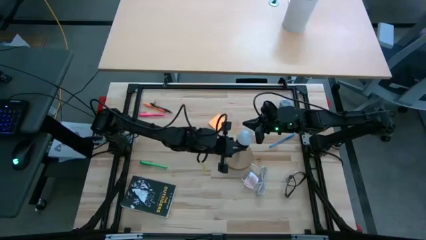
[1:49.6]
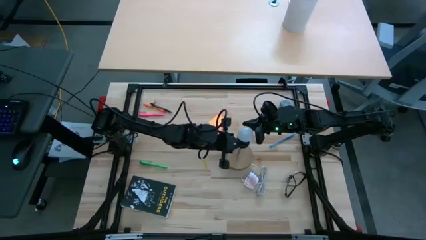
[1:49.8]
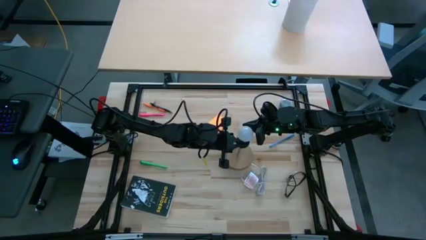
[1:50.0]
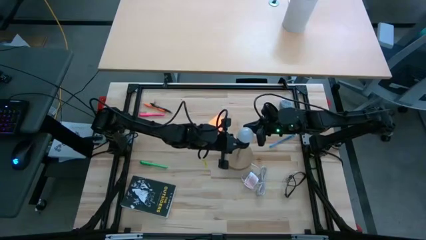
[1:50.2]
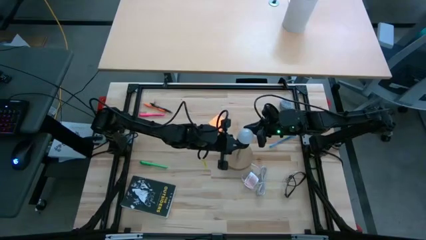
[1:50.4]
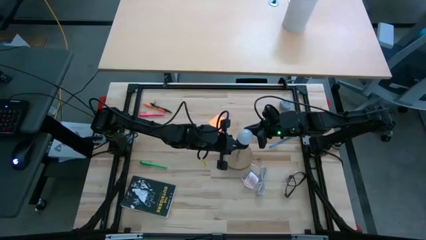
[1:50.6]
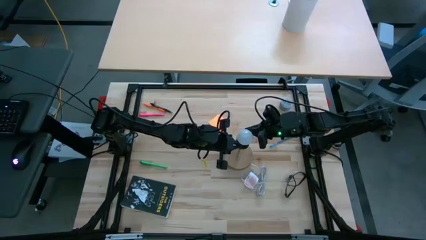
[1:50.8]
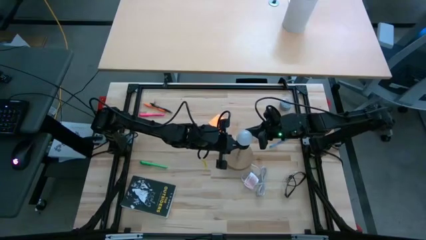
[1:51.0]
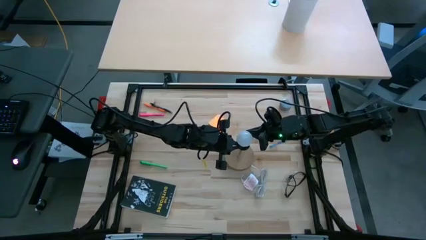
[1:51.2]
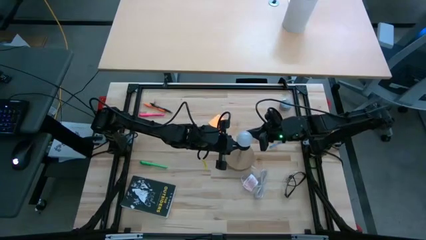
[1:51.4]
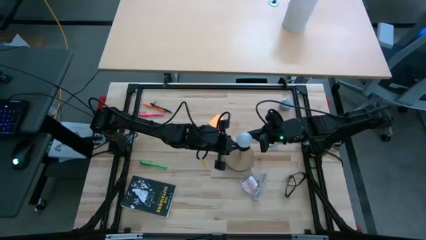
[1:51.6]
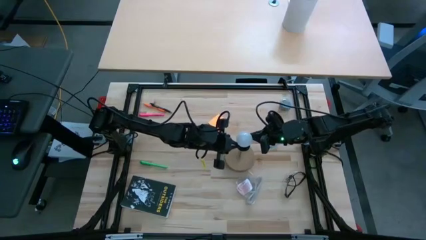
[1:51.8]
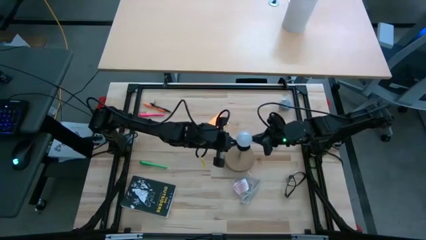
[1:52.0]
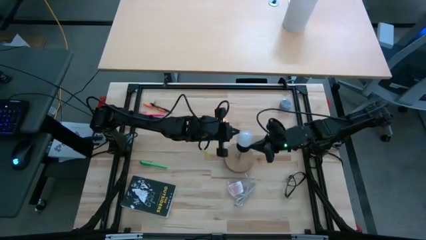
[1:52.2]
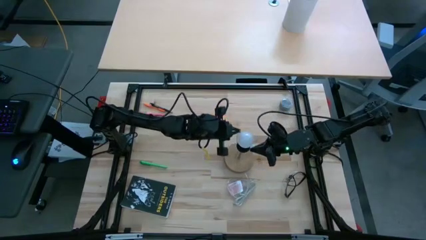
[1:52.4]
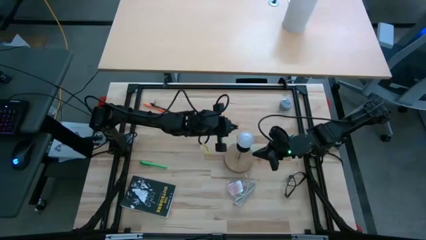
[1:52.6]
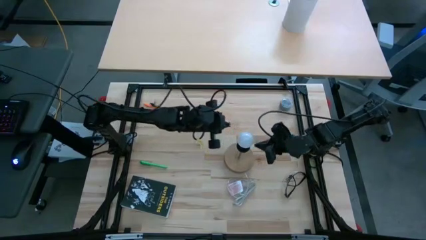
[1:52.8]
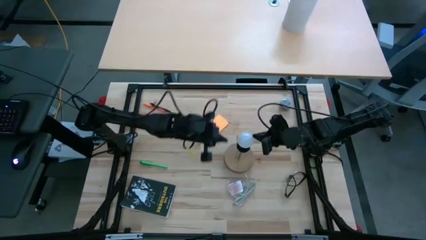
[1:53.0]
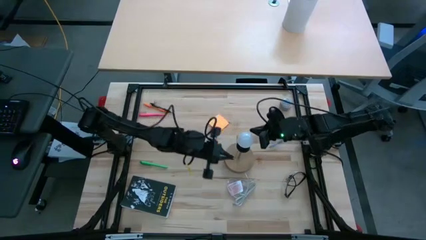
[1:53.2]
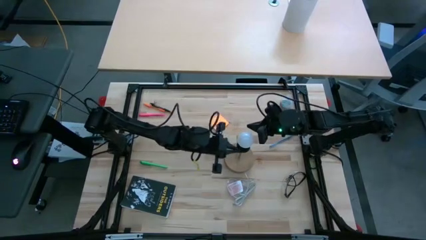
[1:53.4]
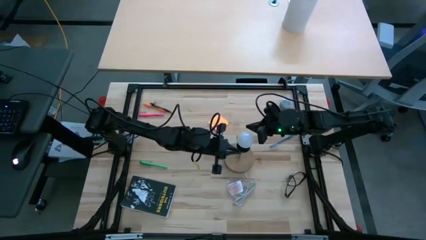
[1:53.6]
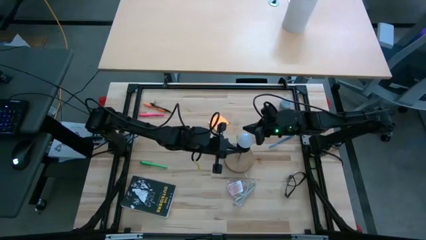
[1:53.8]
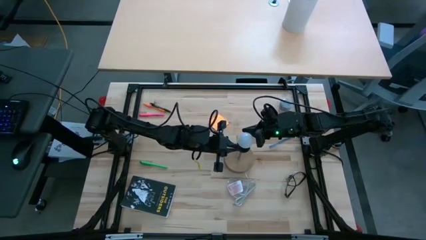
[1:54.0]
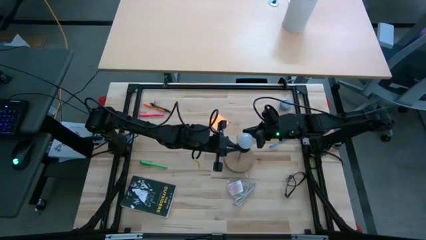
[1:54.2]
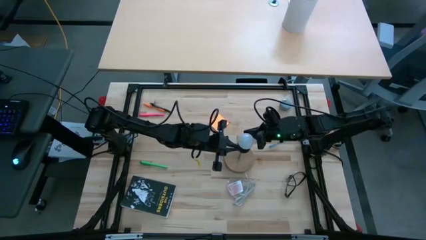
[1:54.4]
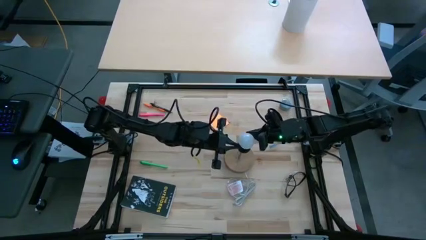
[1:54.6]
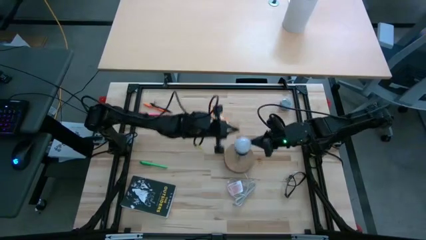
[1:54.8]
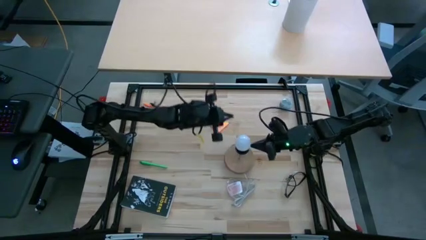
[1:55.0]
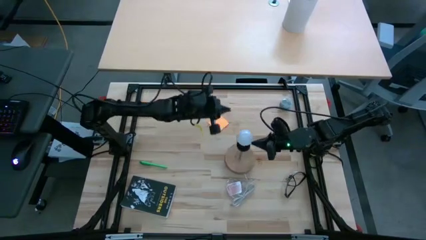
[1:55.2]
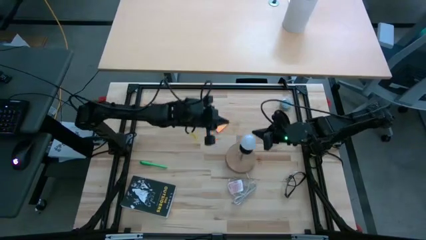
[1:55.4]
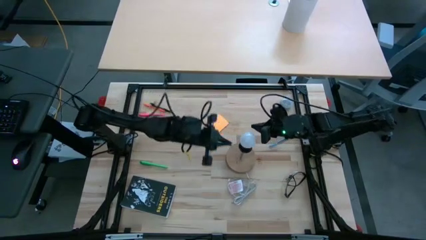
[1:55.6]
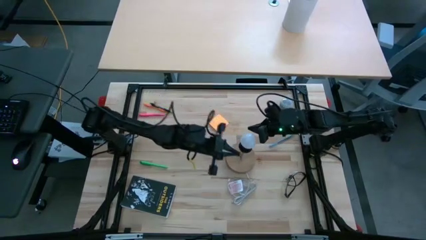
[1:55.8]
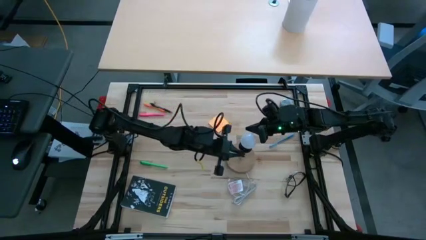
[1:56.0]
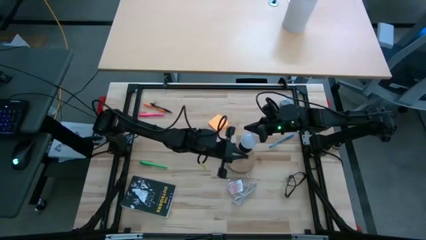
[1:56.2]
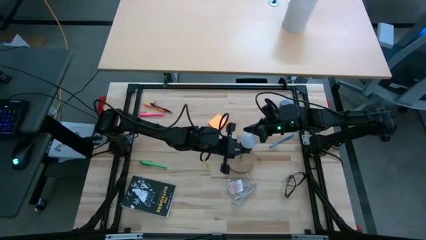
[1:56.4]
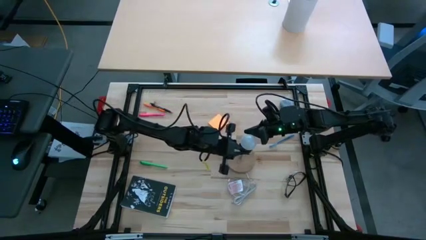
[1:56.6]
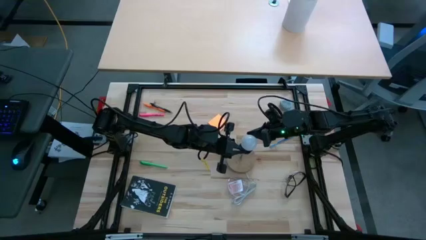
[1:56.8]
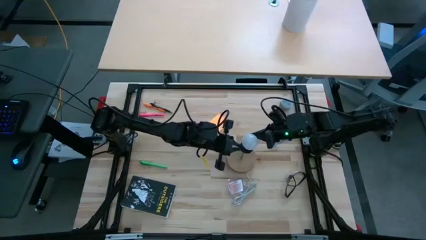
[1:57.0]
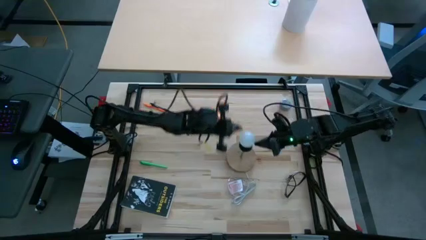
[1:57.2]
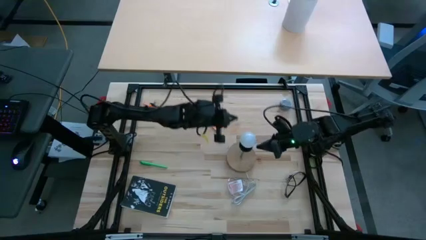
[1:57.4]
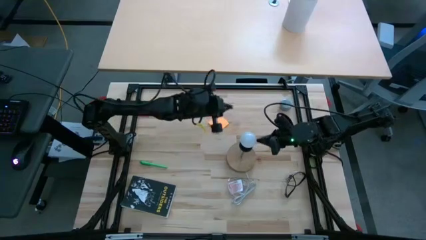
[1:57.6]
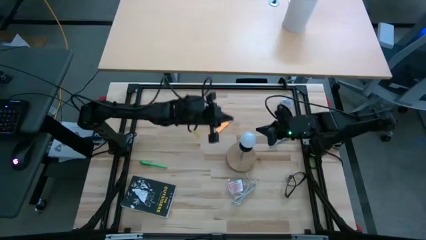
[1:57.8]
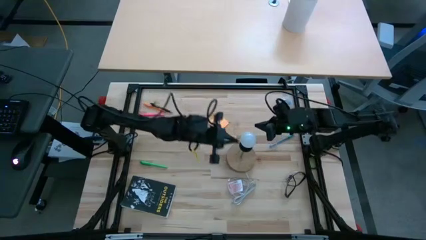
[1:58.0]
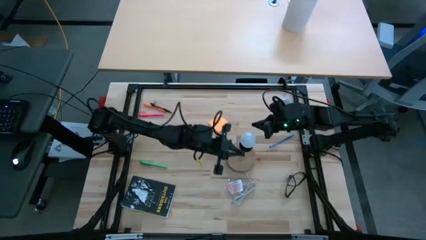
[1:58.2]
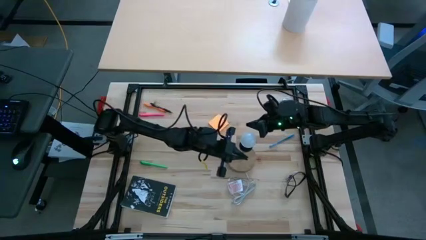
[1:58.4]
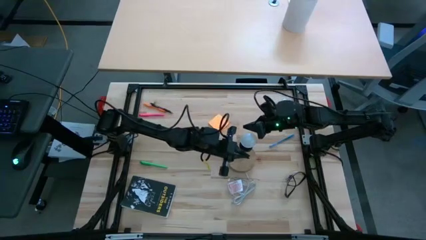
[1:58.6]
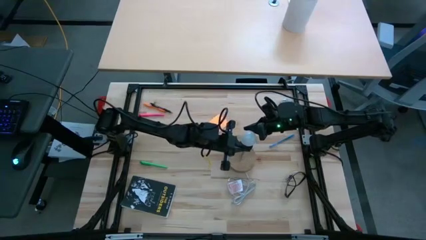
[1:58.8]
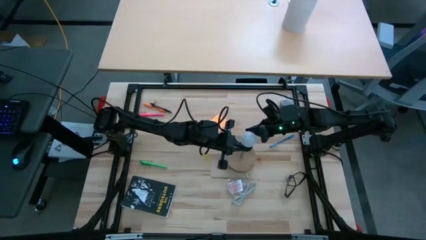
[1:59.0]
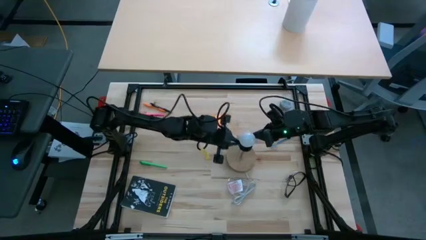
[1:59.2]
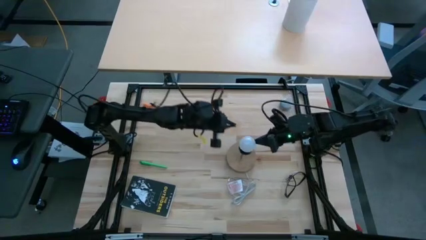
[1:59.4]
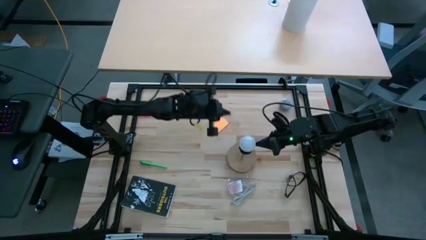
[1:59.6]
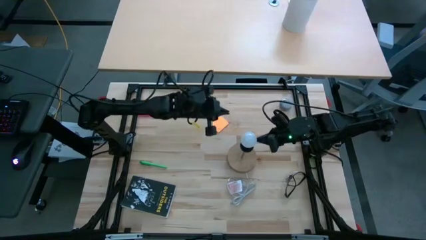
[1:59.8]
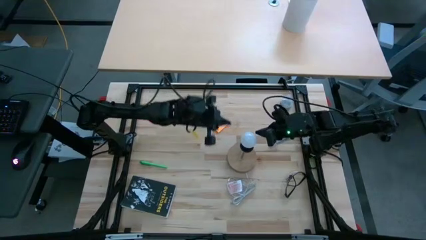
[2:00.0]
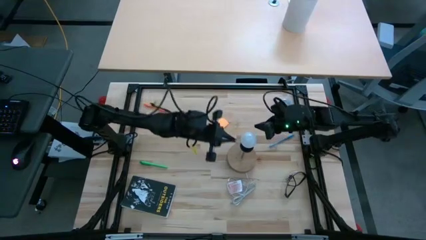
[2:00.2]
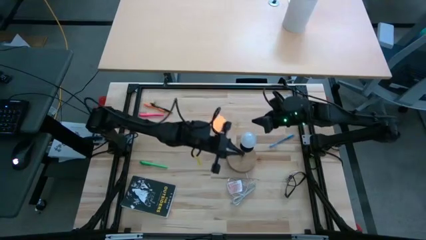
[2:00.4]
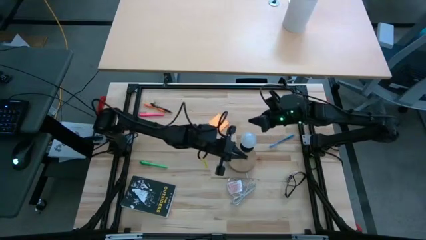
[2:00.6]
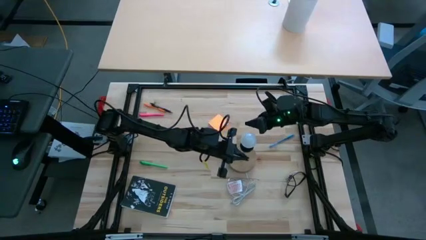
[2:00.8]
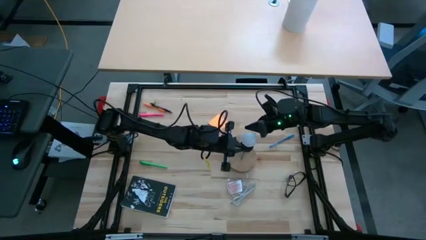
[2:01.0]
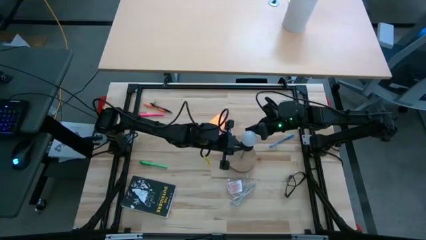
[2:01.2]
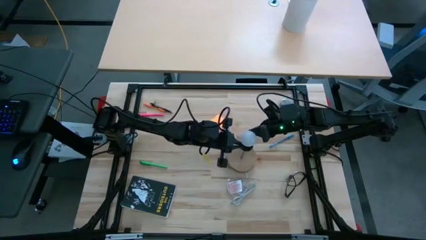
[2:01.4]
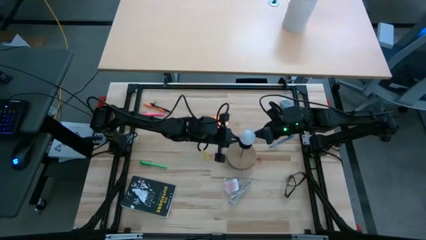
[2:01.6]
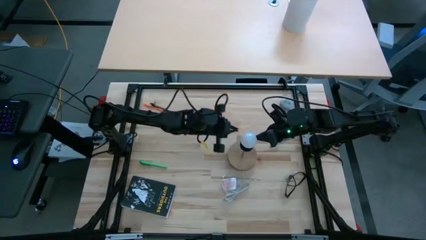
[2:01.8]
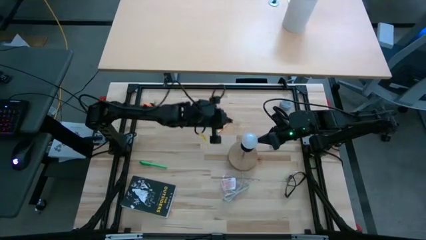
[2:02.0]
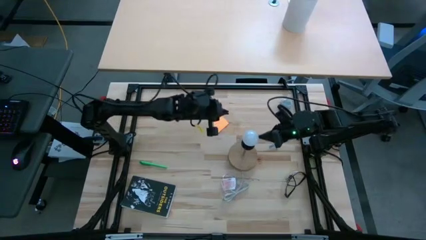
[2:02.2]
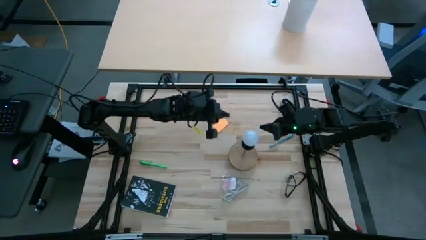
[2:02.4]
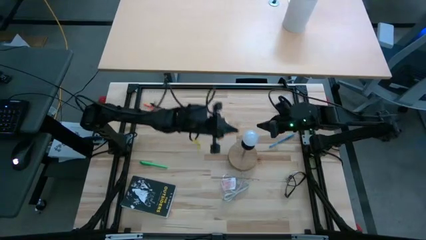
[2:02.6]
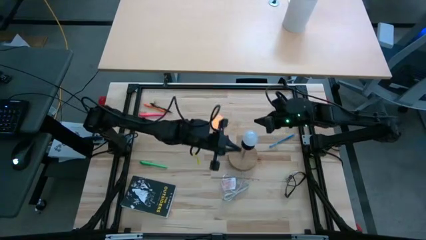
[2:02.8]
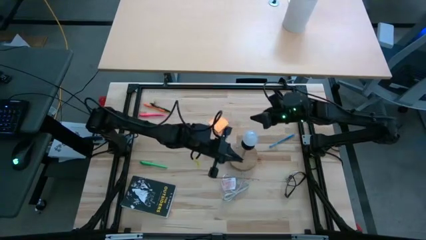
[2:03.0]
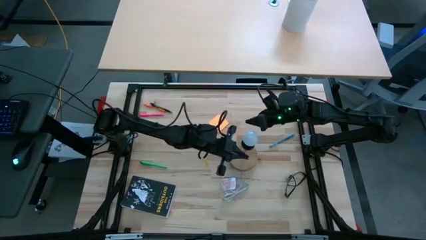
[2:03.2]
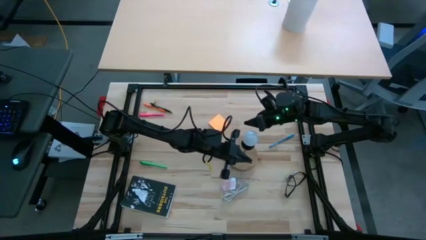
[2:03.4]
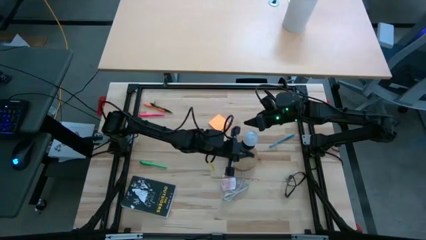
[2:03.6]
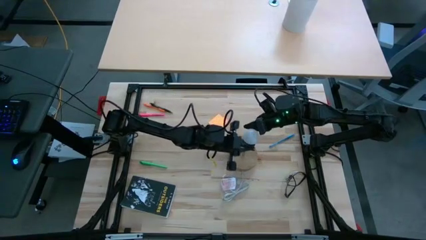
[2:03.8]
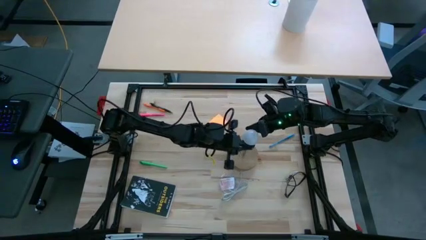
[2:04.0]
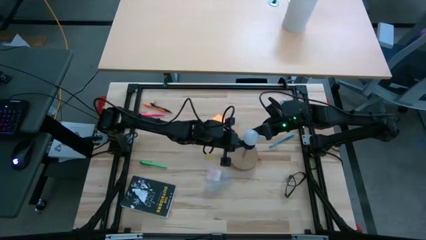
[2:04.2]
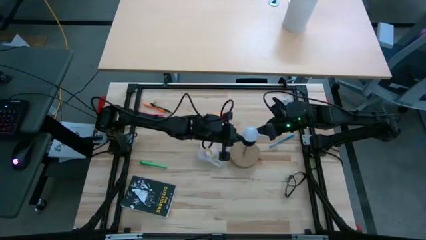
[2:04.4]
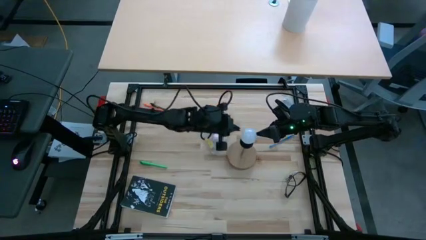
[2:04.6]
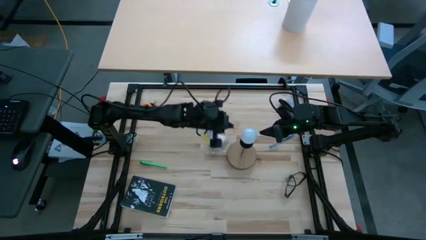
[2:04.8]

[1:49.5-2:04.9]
Task: Screw lightbulb
Insert the white lightbulb into the lamp
